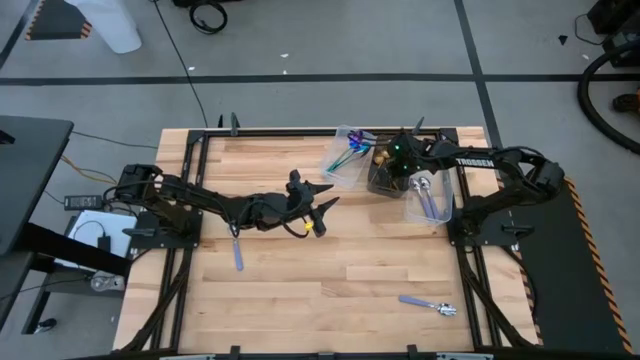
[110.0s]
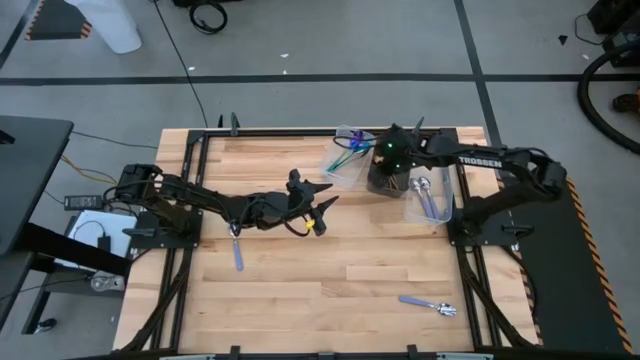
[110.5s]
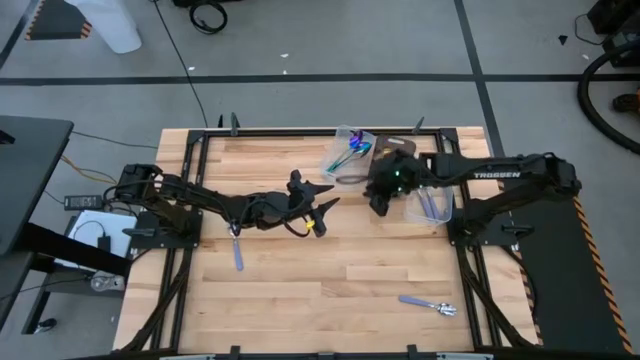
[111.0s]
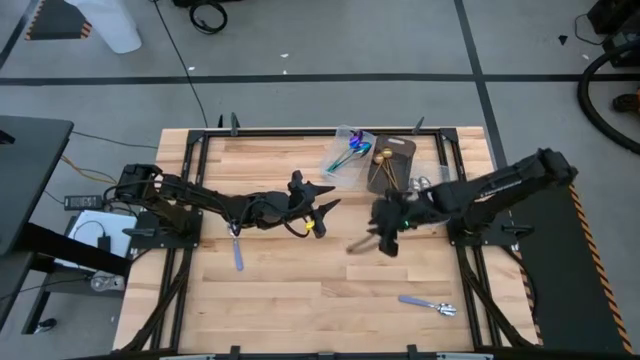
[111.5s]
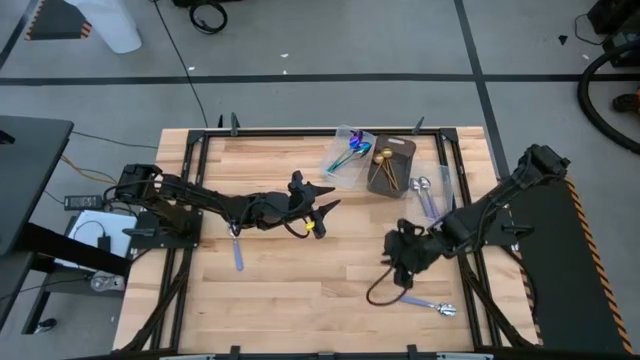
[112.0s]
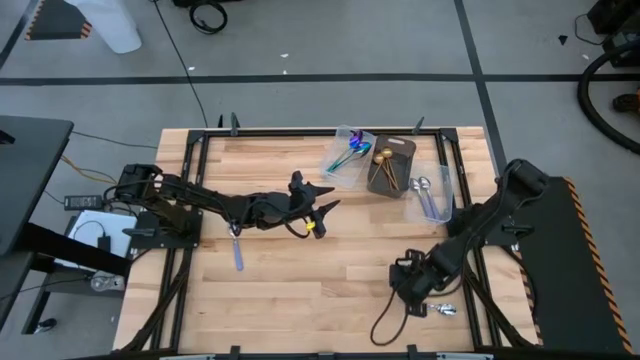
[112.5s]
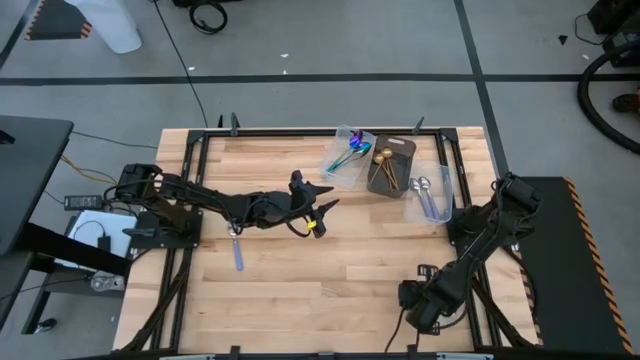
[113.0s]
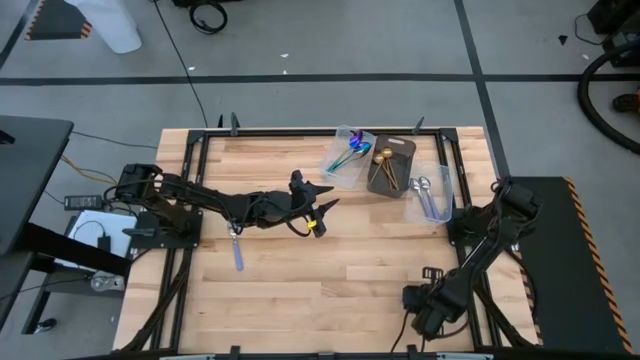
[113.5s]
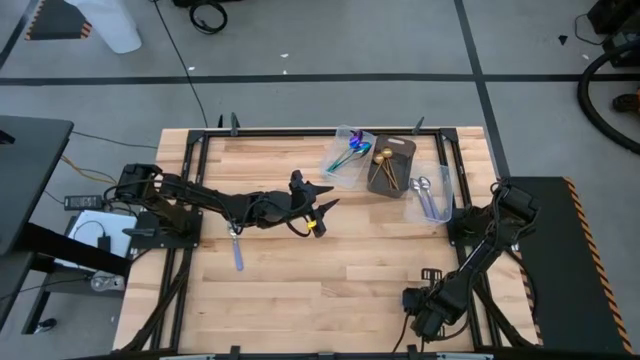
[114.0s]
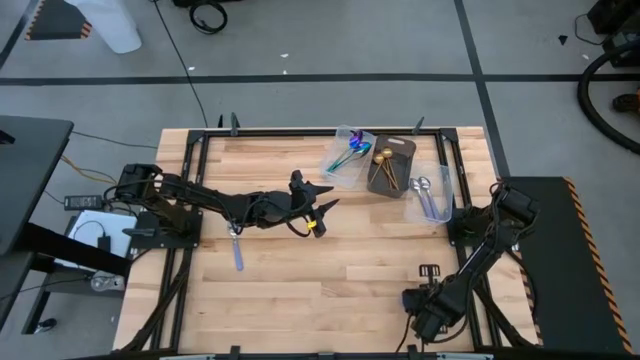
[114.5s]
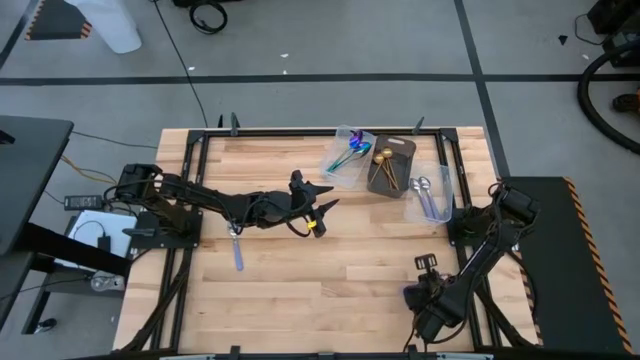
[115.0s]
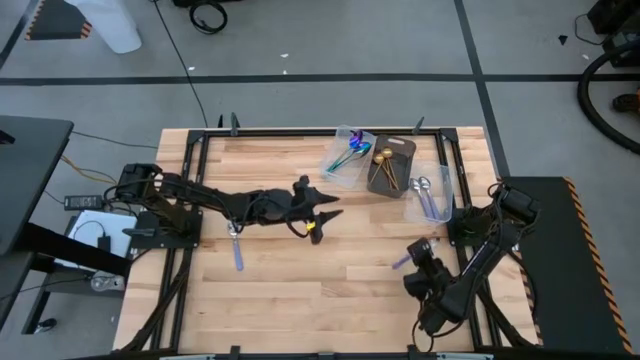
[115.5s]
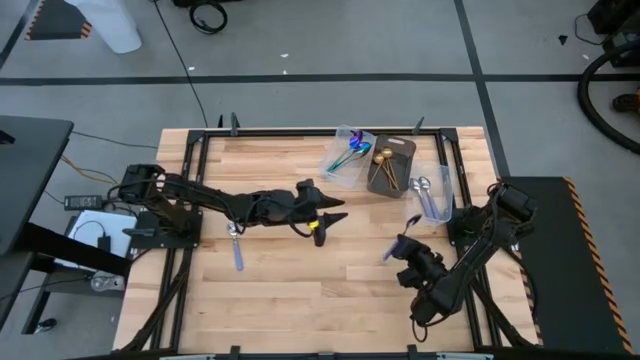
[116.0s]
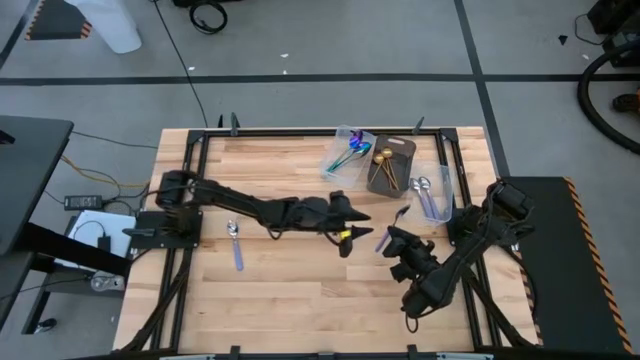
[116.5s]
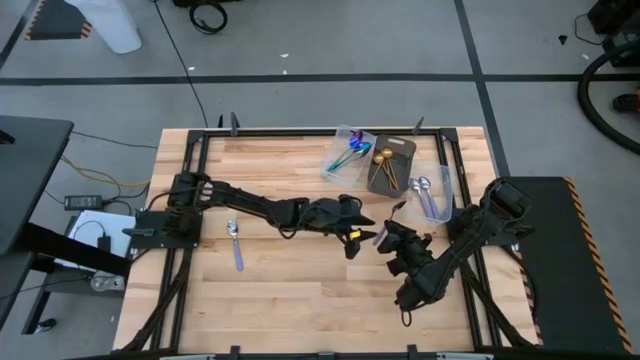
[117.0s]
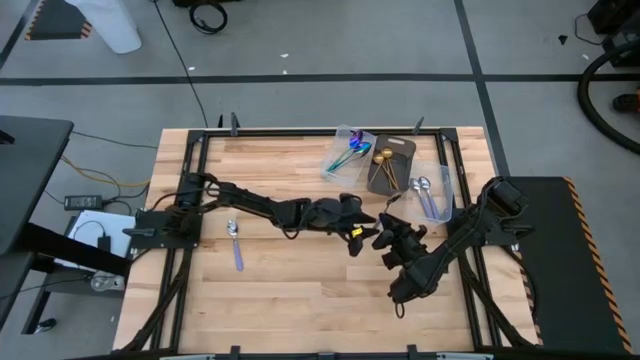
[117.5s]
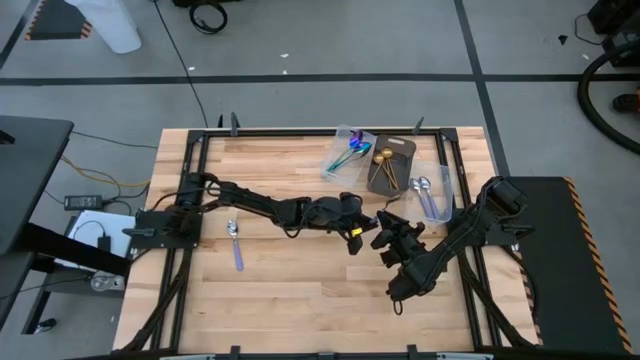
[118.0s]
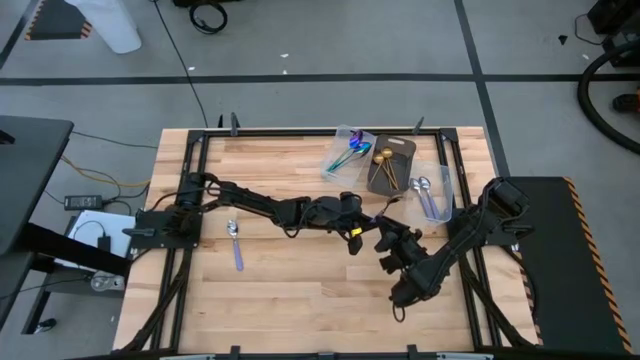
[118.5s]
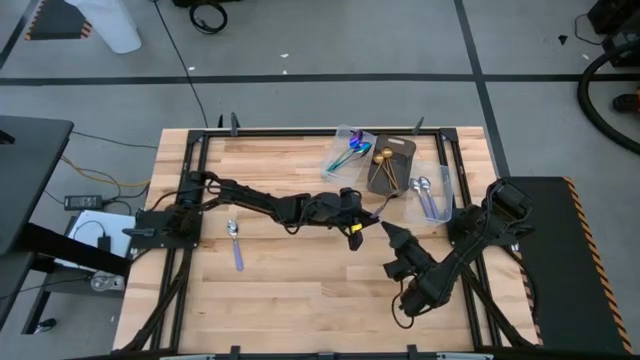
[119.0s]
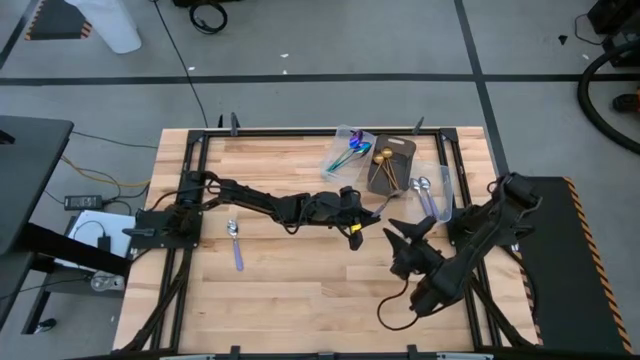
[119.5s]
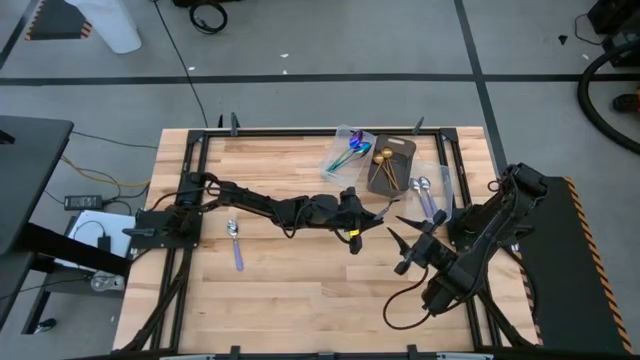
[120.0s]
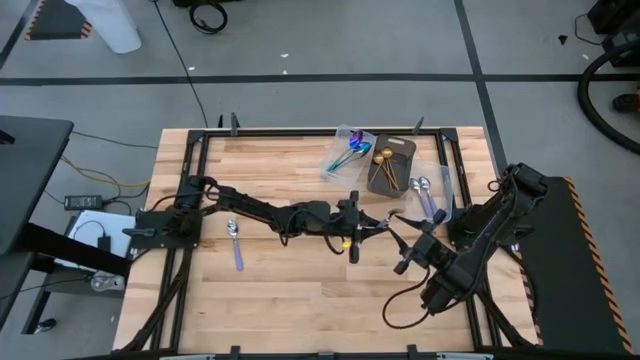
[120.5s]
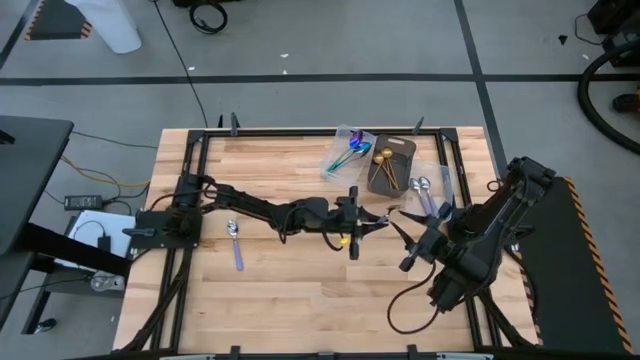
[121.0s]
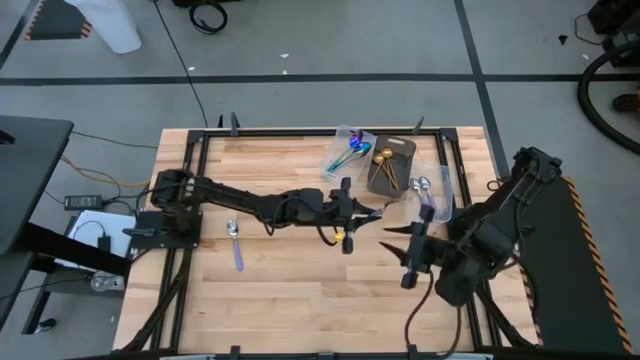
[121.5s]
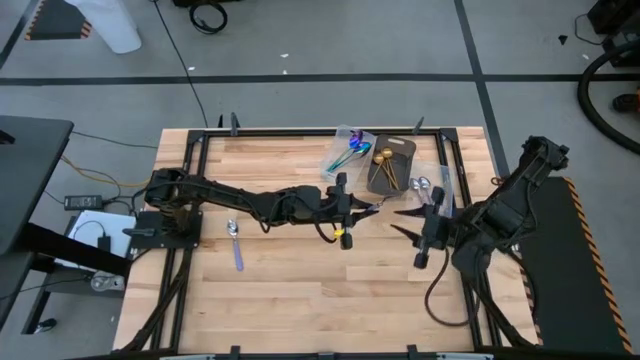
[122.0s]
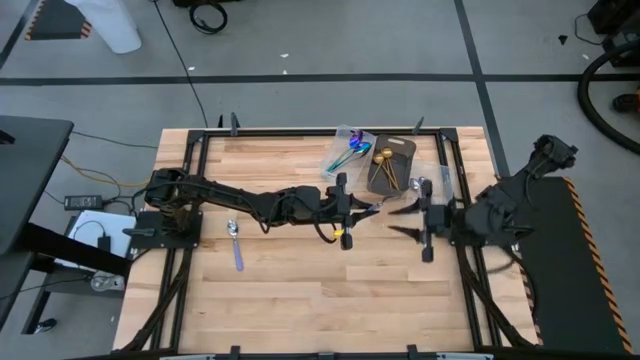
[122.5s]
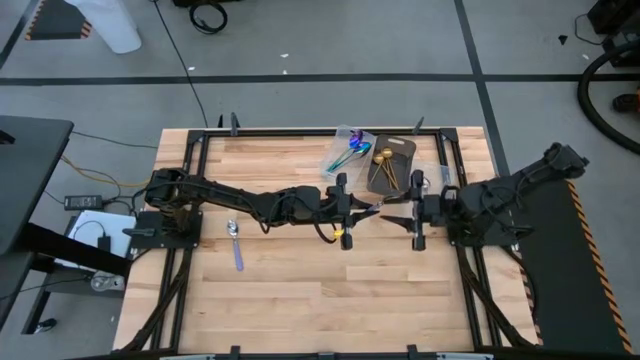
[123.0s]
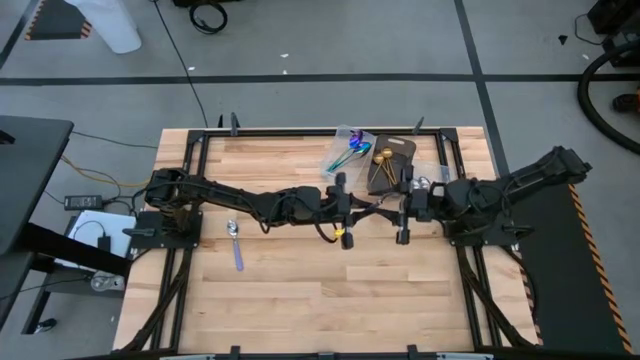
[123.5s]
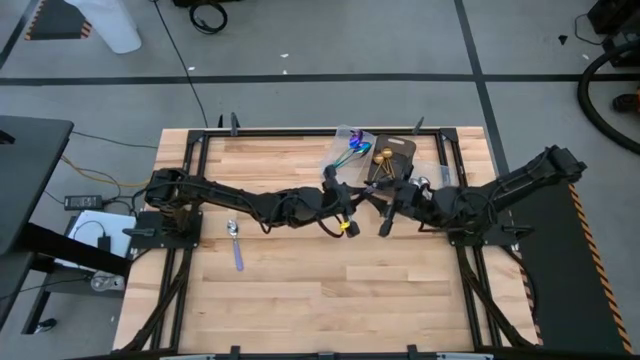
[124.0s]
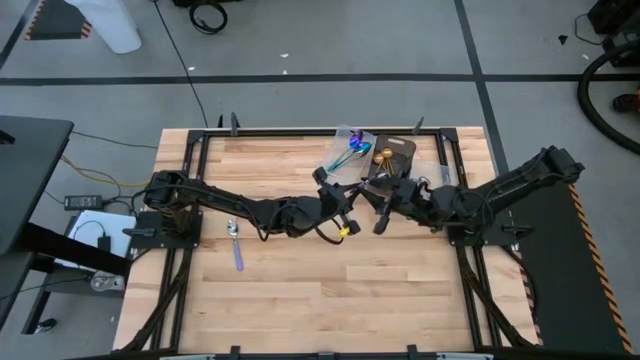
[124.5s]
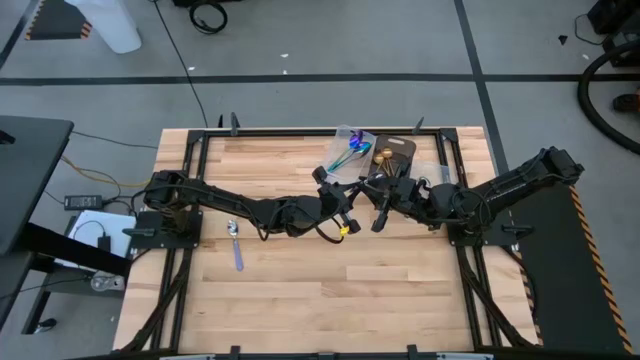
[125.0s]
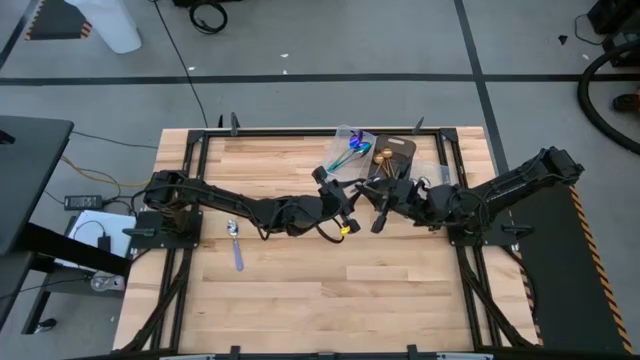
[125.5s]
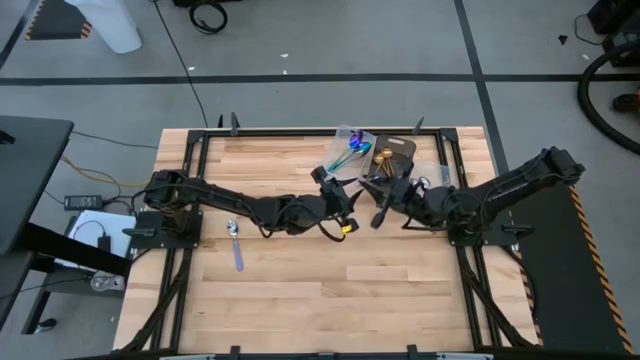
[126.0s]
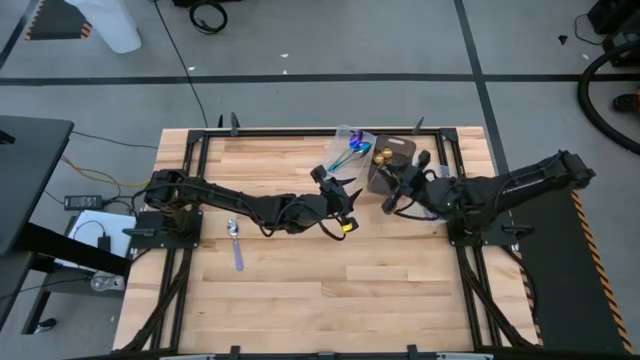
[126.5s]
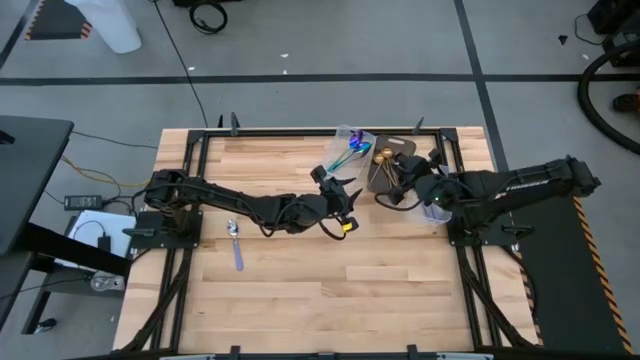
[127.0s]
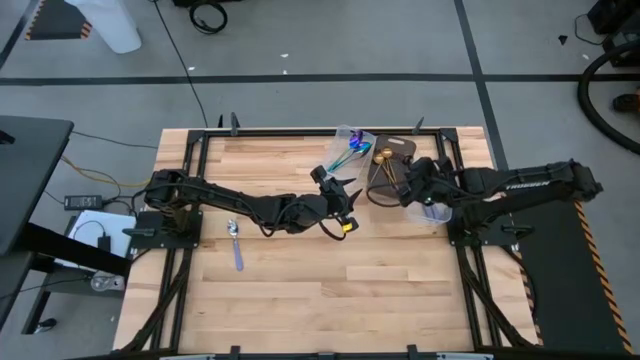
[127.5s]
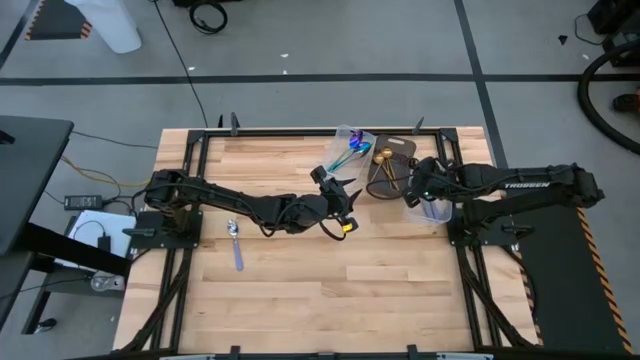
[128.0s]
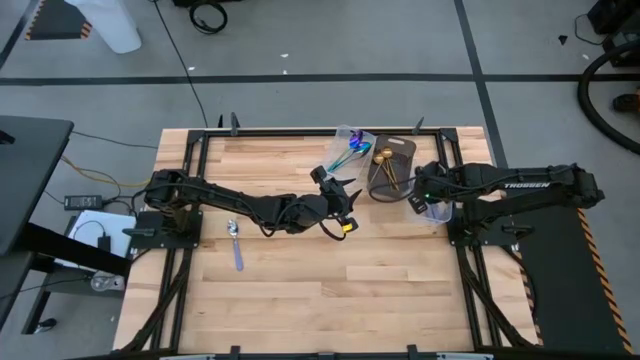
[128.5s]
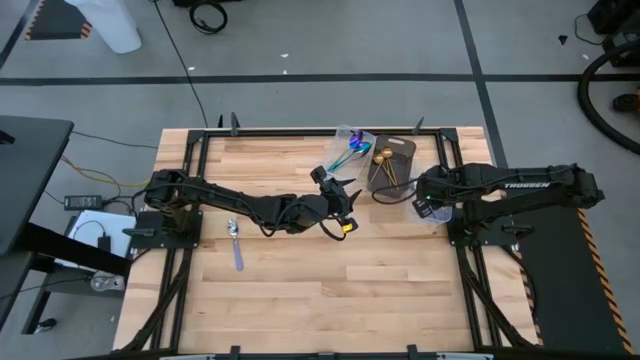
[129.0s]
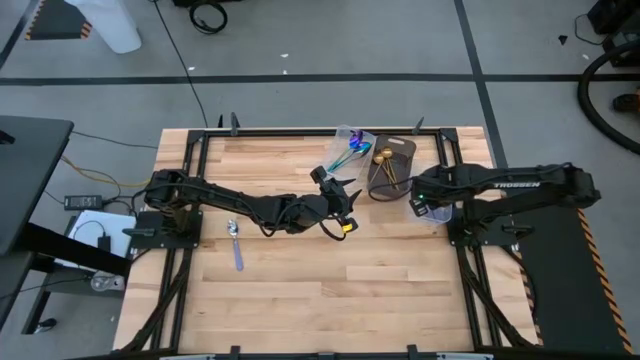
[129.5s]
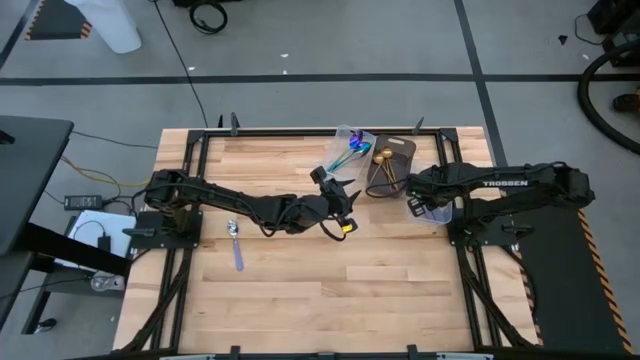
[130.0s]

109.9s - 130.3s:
Task: Sort silverware by color (type)
Put the purple spoon into the right transparent bin
